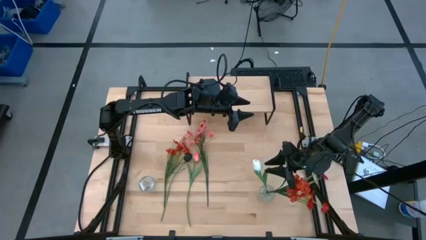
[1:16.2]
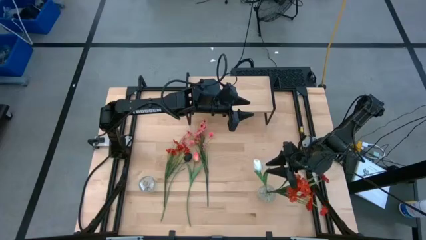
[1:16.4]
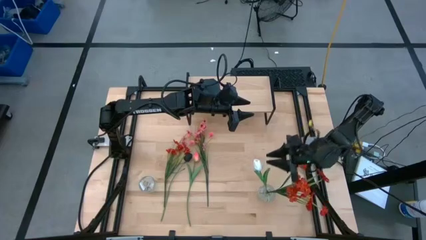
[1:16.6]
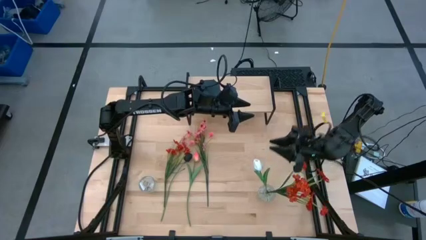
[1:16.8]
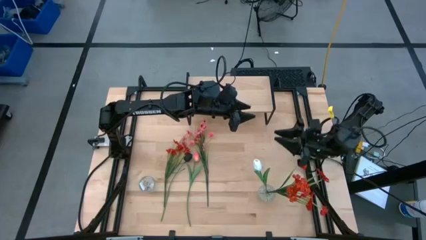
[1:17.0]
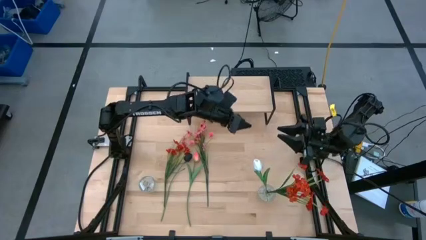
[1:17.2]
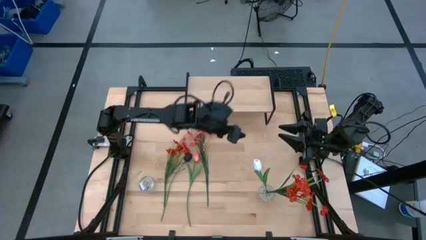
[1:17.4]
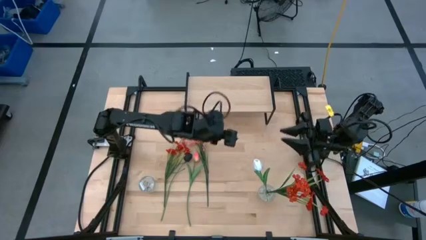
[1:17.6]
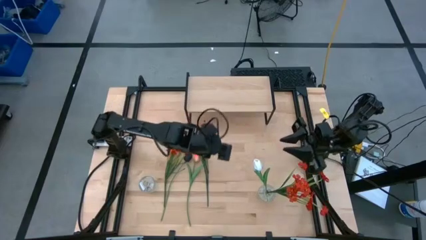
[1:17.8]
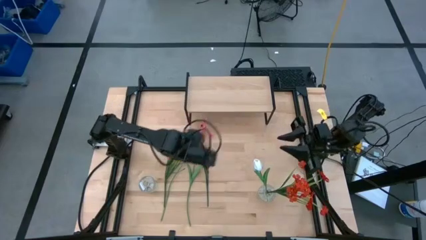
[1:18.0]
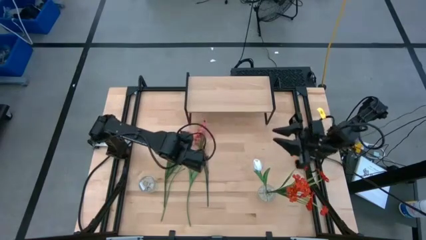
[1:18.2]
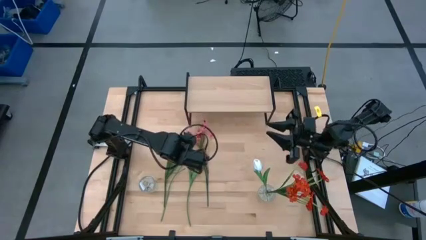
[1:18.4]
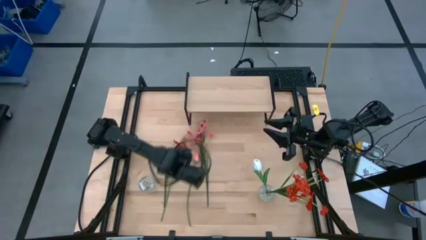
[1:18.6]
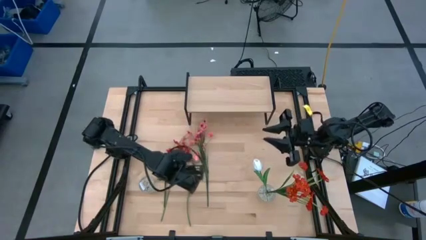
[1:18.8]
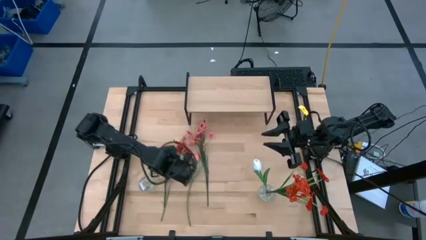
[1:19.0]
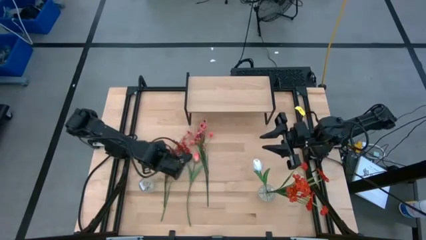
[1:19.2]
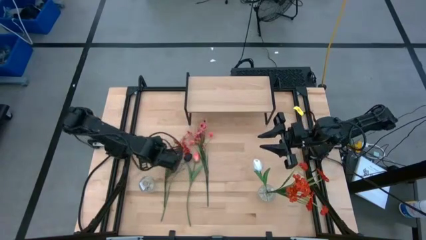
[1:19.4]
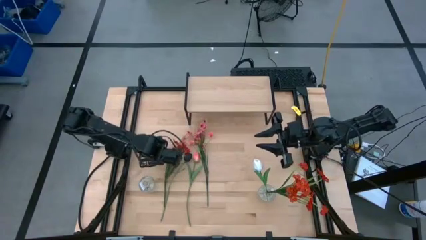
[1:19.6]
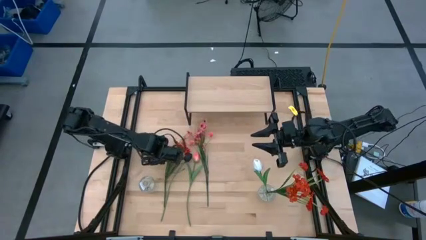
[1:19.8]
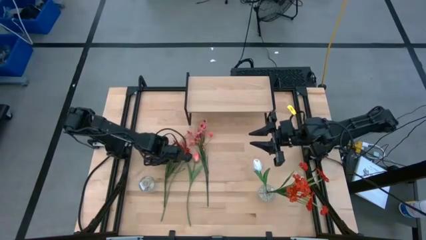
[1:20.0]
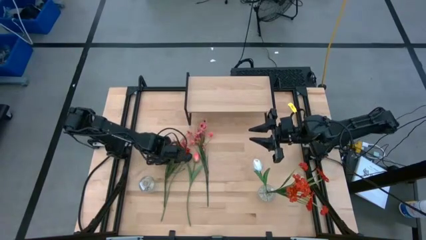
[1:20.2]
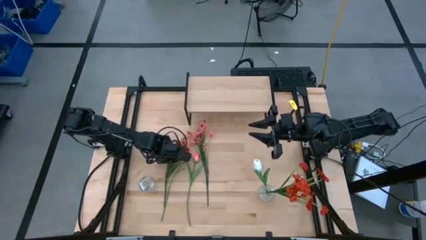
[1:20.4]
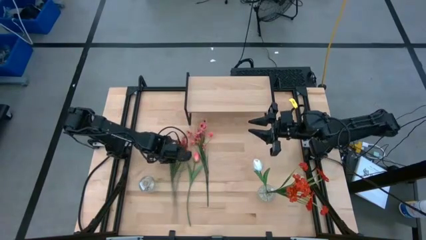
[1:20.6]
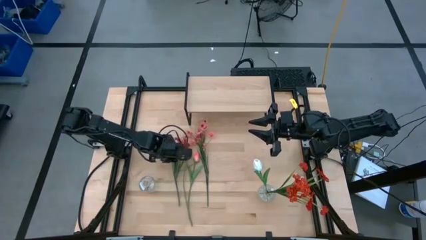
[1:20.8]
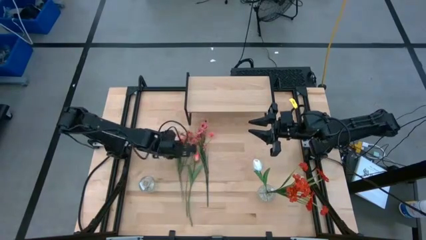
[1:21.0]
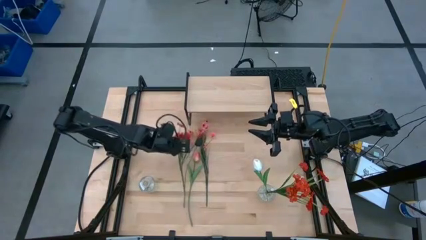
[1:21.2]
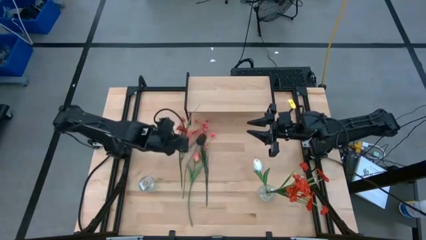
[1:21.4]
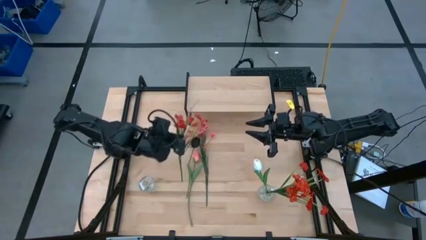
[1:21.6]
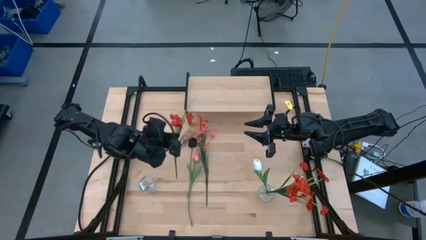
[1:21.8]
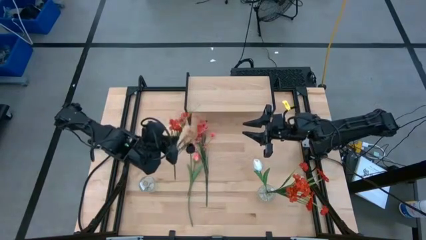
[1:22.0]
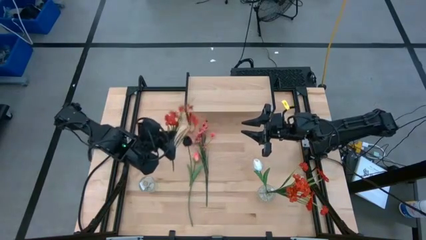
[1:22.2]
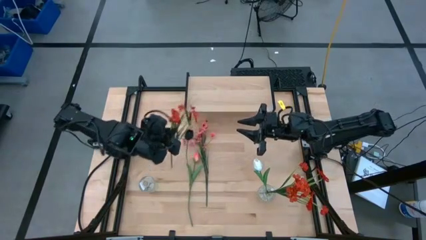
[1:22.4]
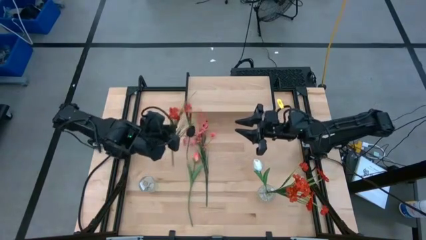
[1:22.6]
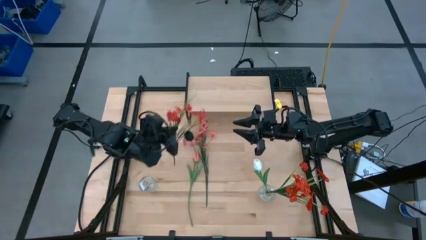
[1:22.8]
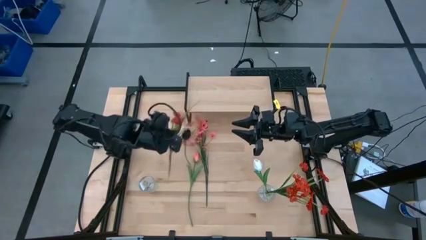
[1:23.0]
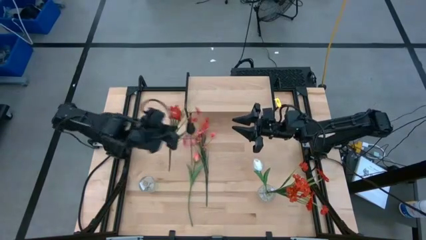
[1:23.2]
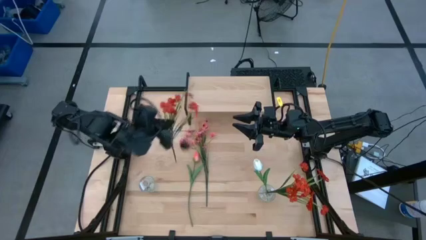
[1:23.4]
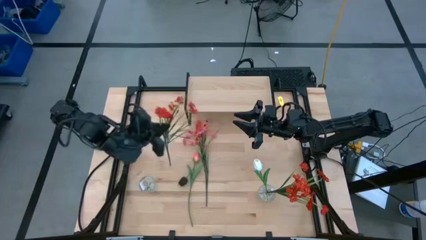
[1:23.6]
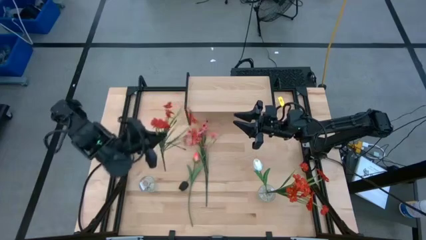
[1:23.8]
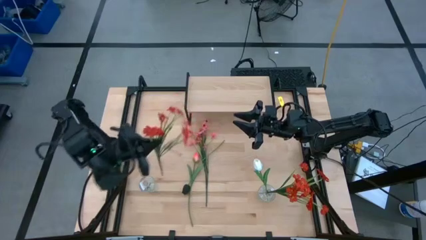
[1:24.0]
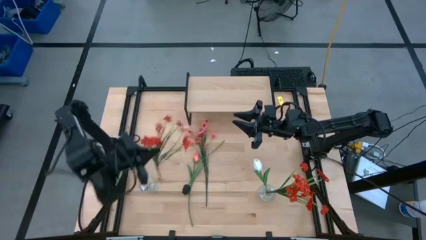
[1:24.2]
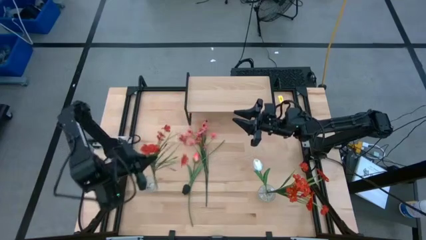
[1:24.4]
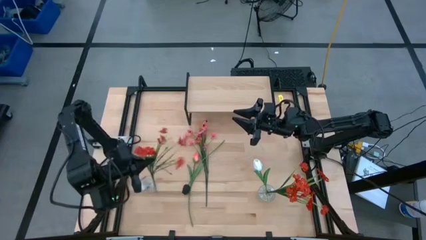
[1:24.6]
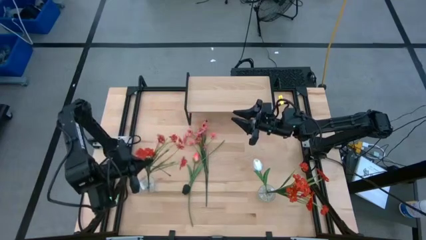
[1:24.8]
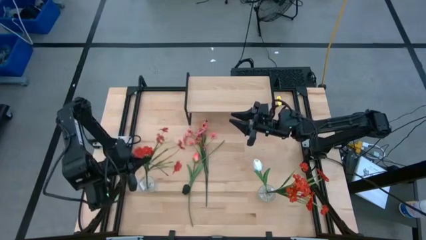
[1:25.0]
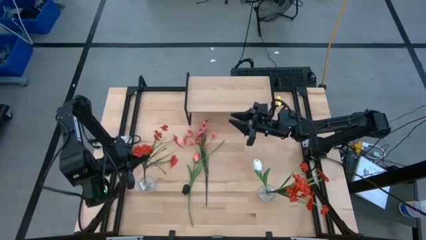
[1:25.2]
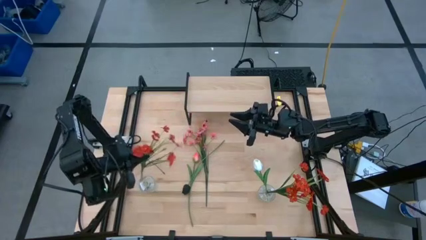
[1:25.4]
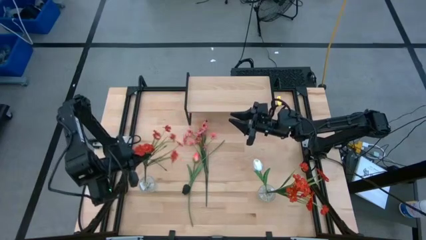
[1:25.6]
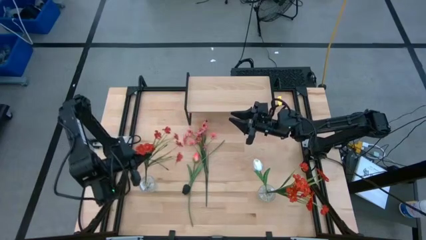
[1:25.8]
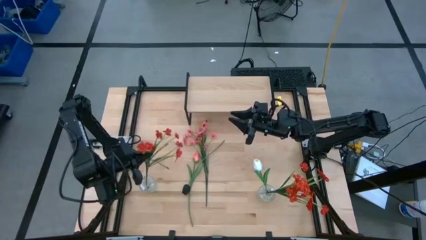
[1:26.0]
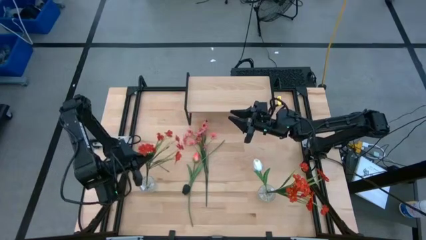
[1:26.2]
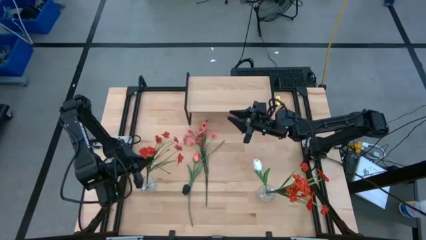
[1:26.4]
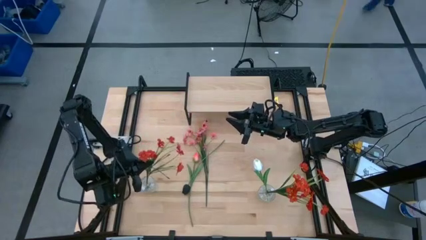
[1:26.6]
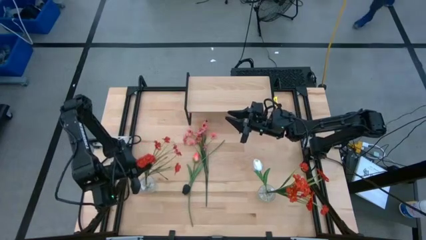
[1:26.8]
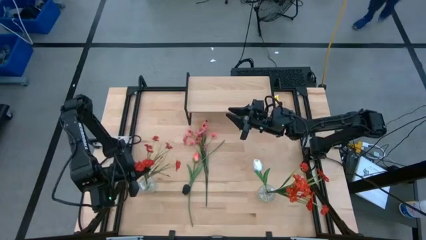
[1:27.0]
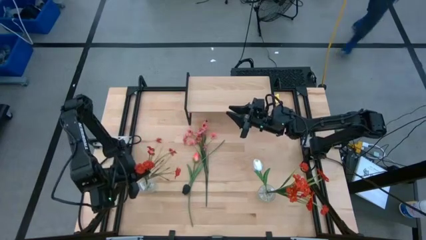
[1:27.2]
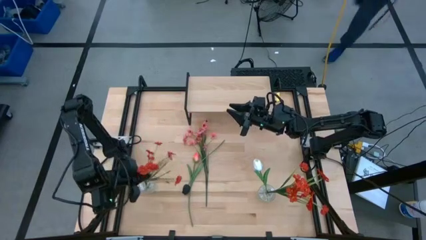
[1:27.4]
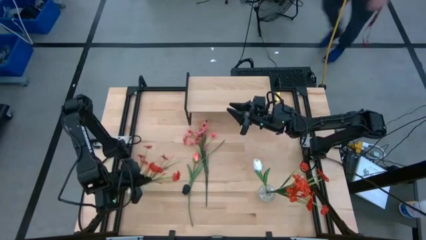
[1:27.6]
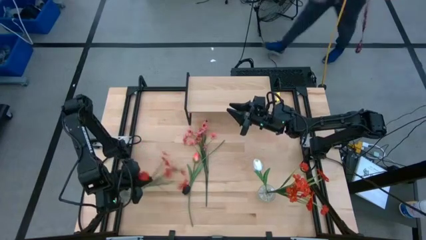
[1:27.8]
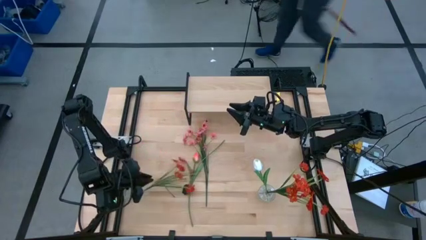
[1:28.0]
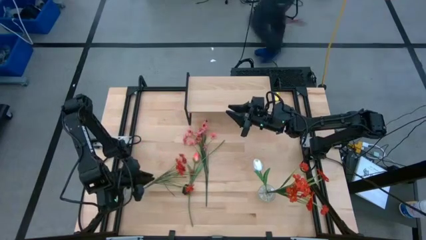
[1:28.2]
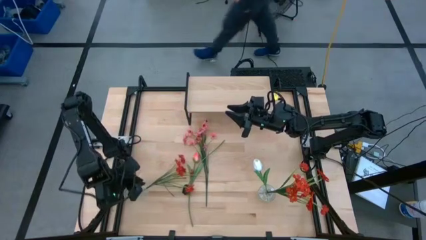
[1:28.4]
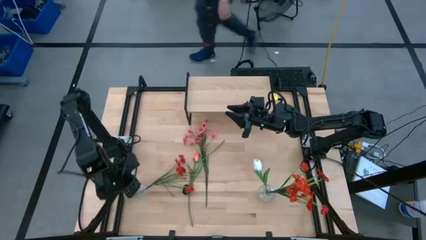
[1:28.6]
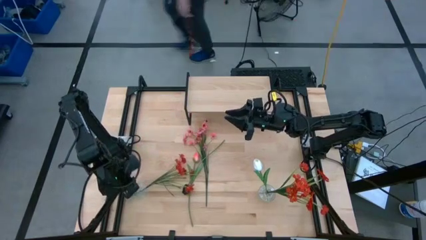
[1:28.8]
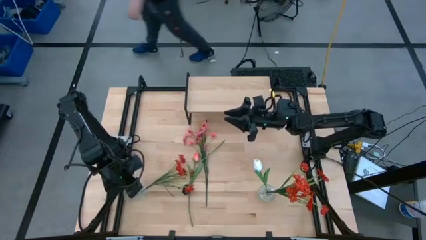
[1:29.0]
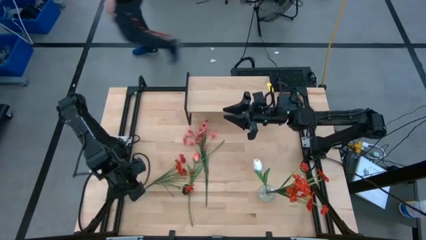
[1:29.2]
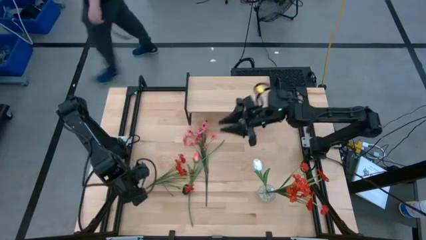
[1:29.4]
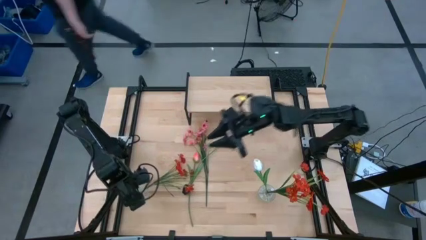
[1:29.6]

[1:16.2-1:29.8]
Task: Pick and place flowers into a vace then onto a shelf
Put the orange flowers into the left transparent vase
